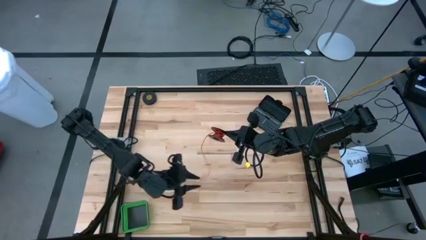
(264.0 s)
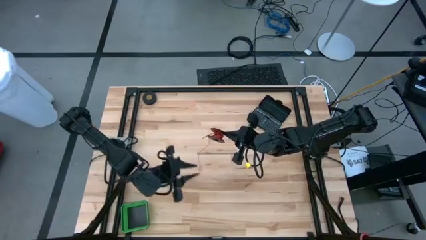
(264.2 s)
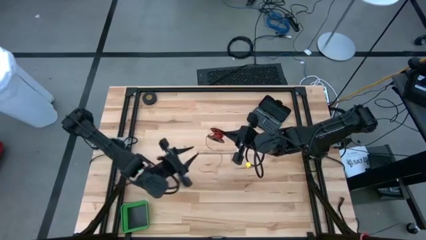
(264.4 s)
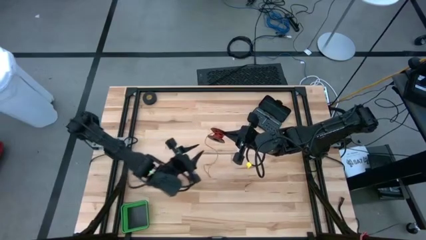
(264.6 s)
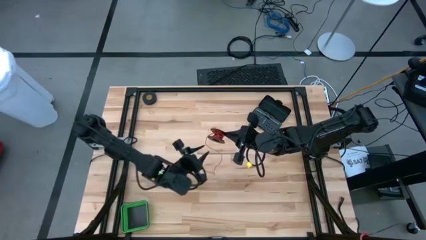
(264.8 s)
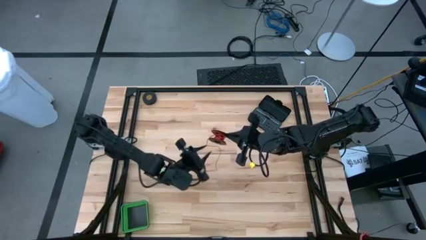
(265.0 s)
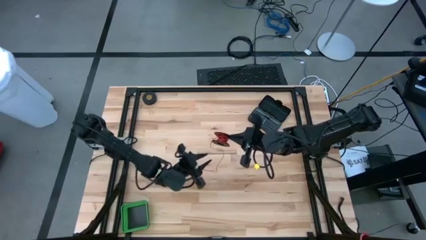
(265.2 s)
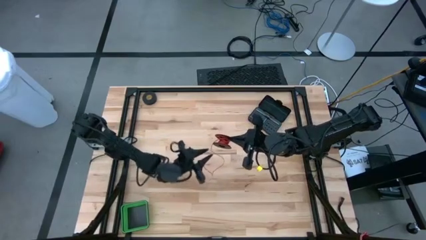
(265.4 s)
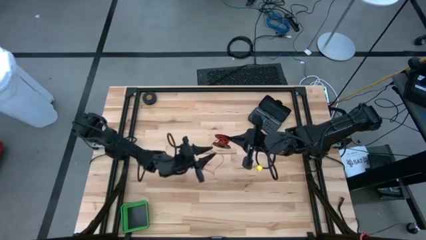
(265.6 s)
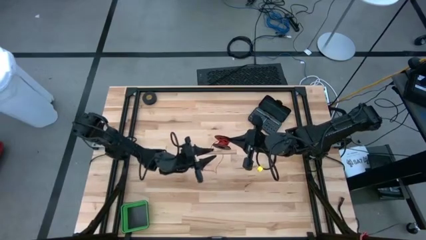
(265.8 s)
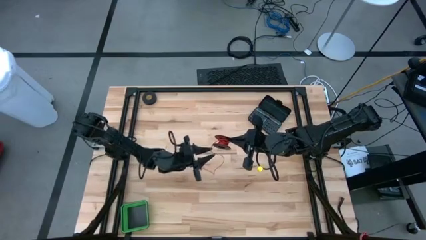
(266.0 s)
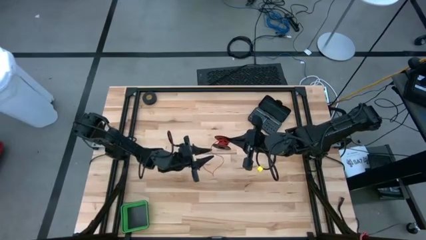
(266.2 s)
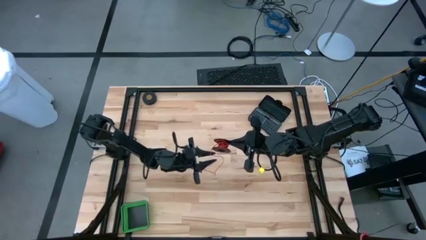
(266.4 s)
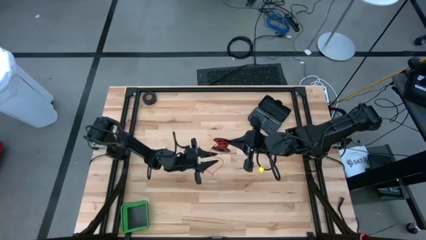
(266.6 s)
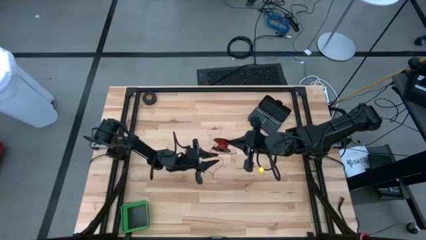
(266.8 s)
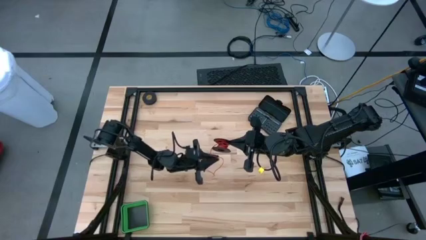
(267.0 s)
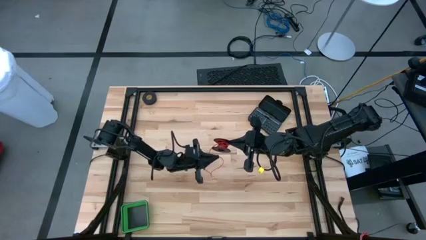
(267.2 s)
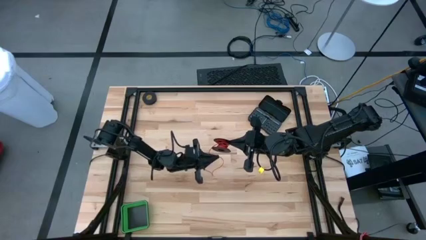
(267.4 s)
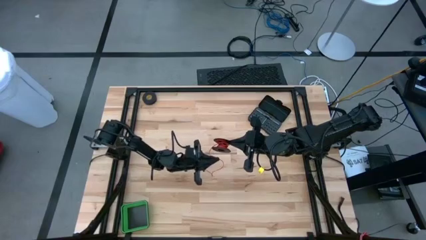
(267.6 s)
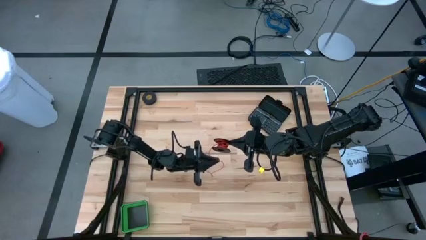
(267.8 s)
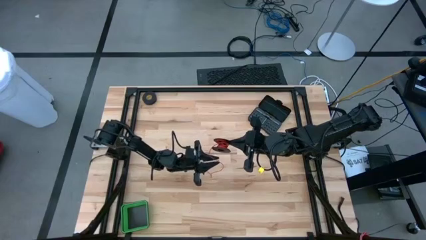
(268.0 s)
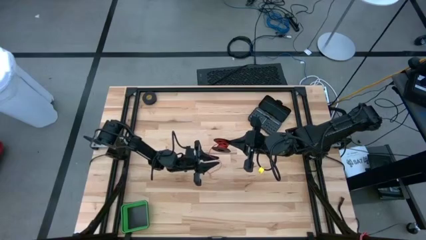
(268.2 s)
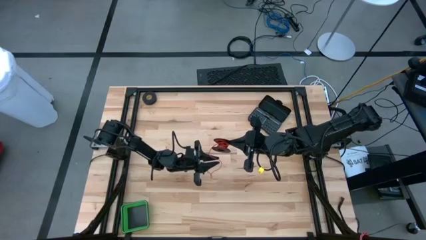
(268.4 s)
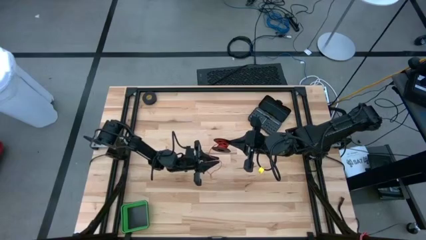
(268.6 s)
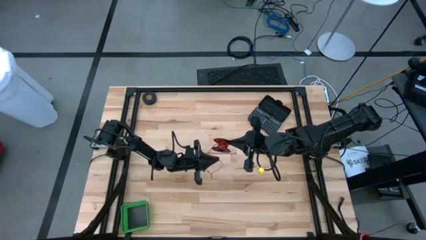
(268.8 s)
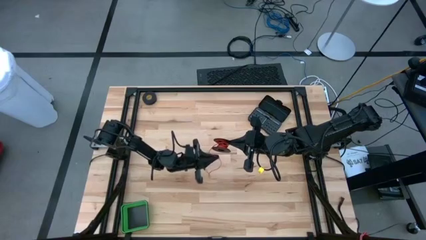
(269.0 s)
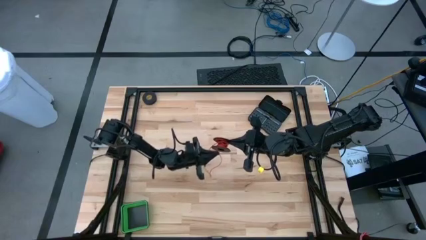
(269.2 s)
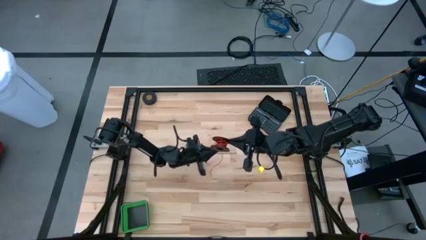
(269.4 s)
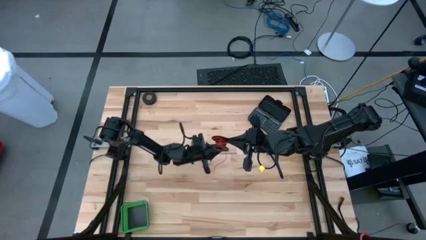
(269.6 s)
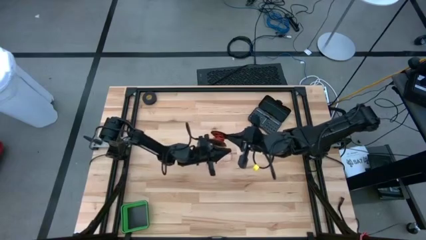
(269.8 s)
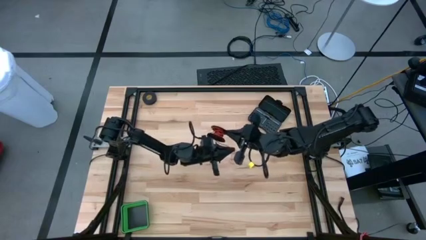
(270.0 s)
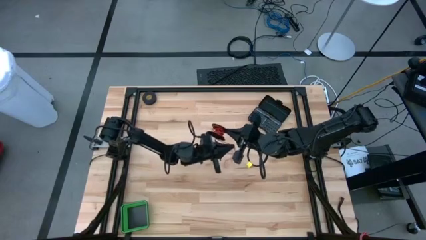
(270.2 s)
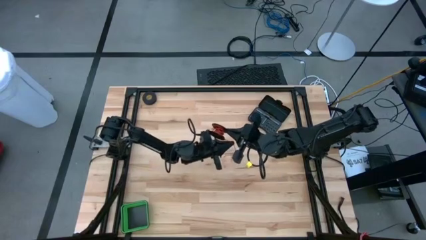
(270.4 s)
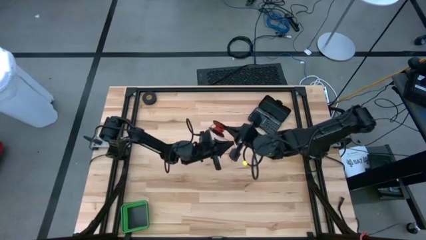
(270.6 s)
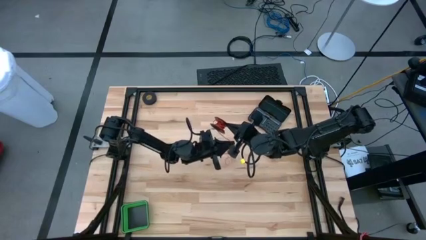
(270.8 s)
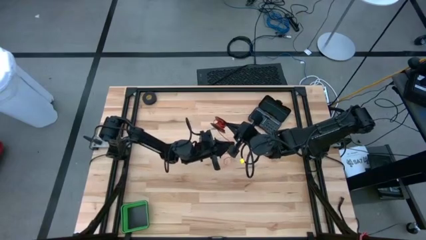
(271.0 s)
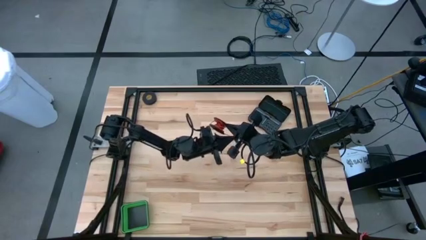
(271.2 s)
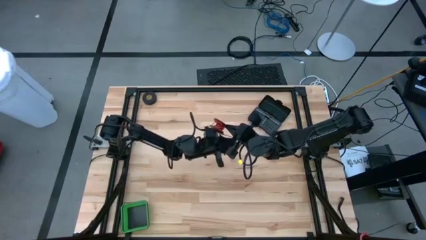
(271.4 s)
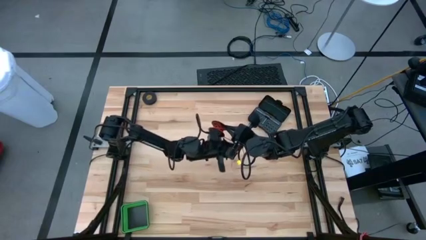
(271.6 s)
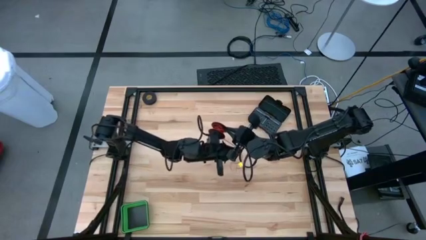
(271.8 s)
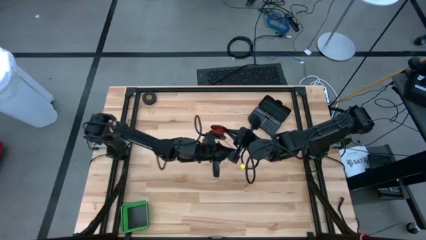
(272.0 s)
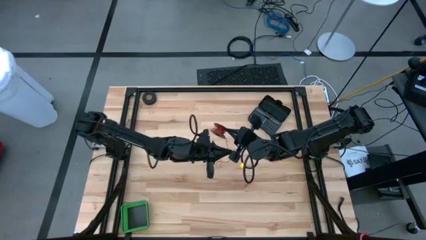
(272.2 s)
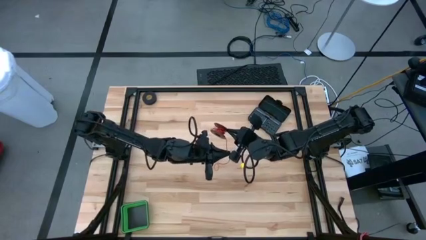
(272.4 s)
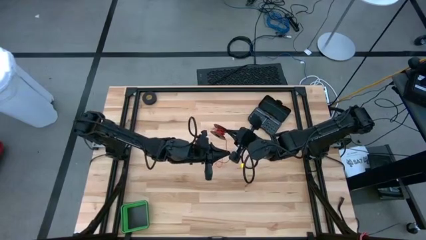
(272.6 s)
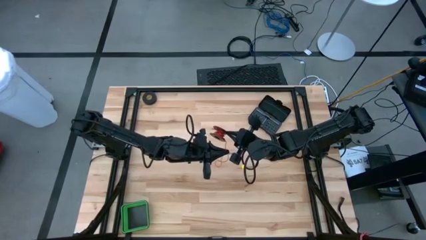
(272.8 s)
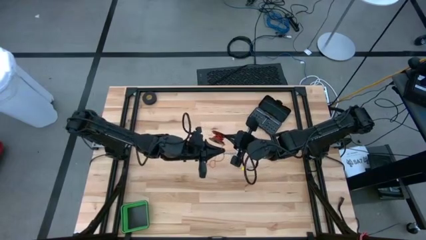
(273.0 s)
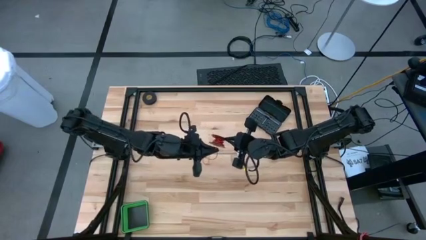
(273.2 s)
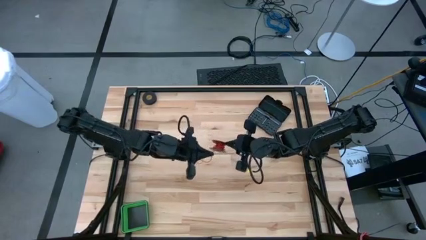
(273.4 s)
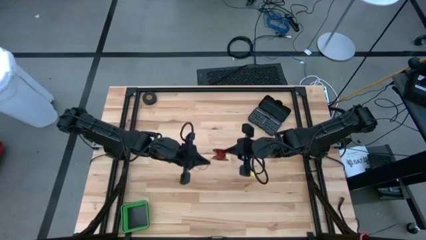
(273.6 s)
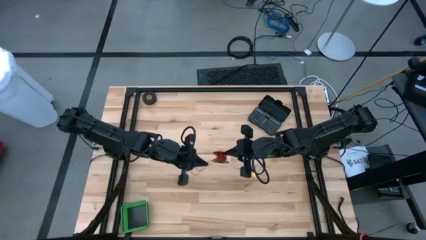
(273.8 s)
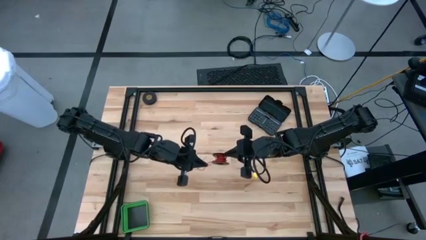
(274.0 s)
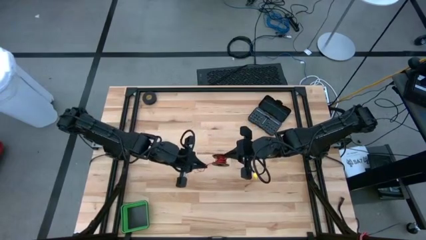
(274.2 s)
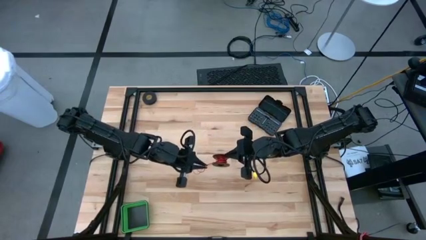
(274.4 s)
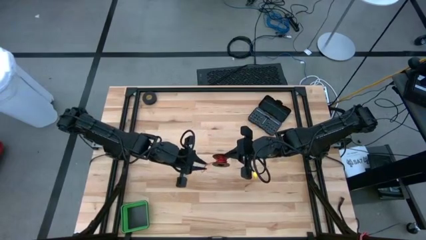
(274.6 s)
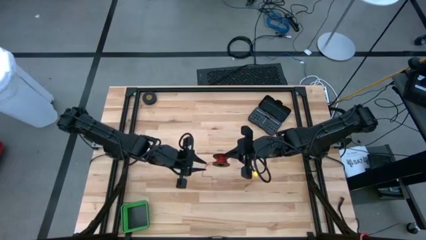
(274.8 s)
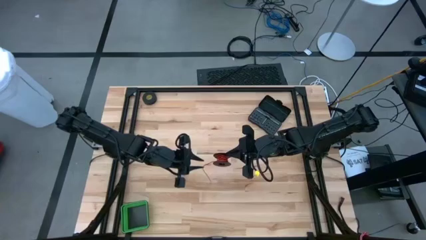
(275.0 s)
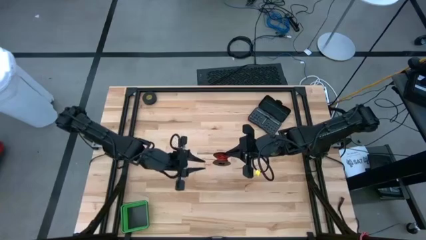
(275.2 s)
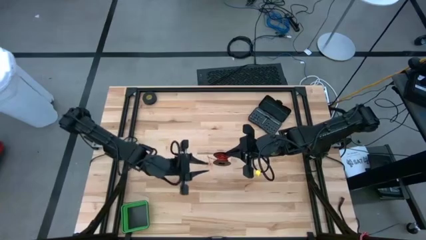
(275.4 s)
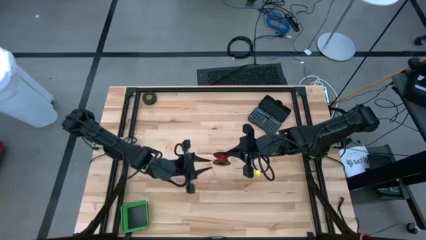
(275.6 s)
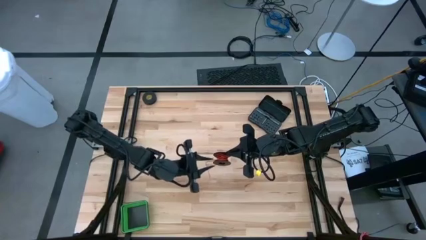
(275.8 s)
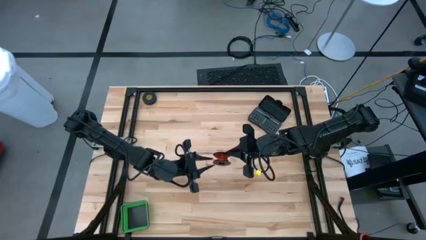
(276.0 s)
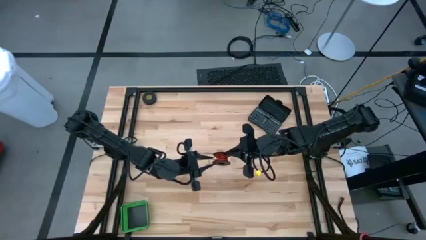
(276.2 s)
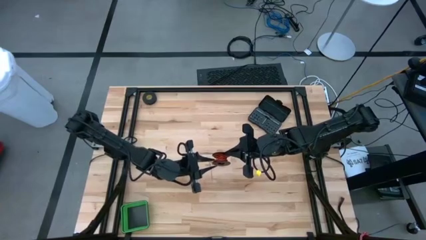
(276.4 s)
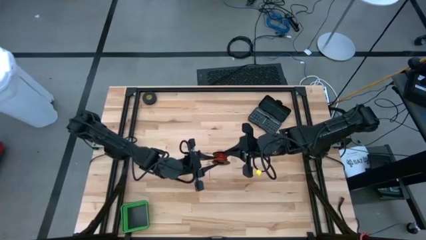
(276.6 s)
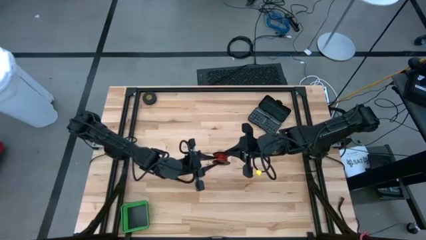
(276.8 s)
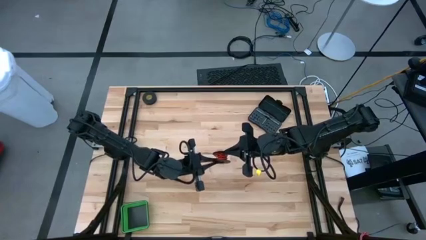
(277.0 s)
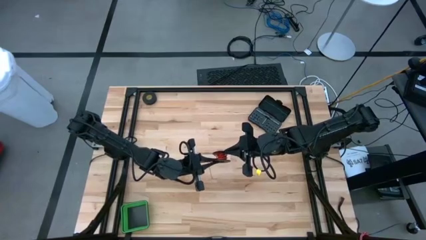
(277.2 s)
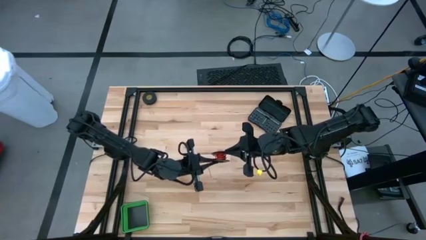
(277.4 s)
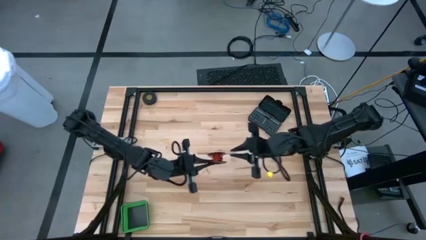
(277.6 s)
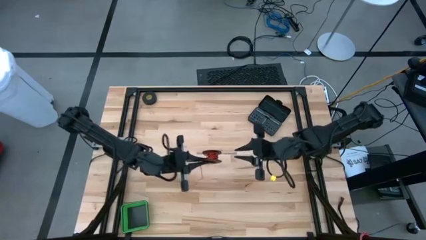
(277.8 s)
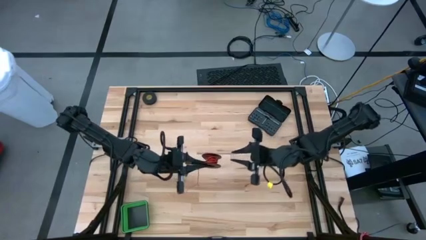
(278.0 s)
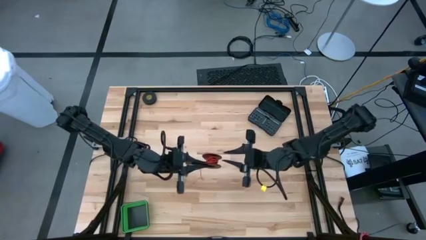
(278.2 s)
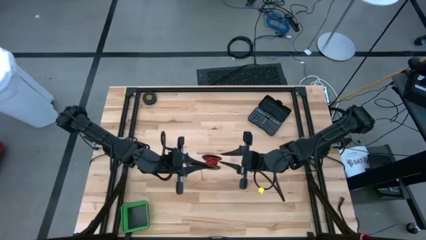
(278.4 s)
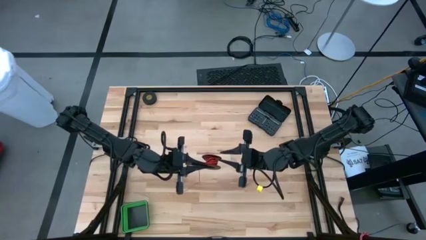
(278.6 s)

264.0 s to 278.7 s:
Task: Coil cords
Coil the red wire into the spool

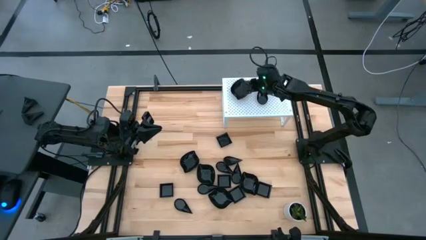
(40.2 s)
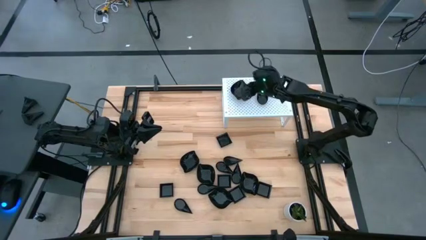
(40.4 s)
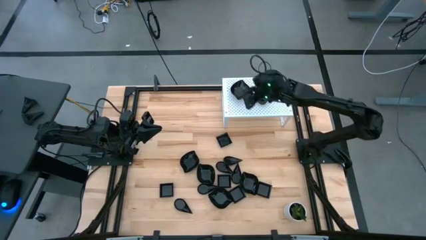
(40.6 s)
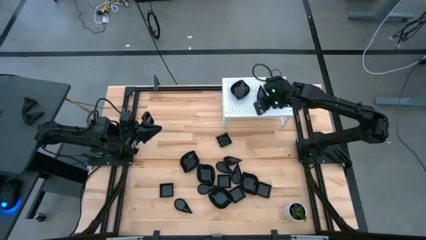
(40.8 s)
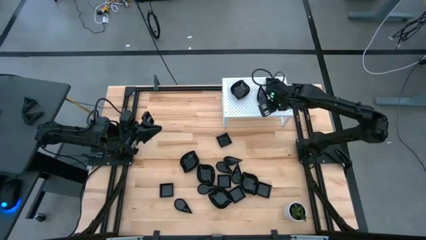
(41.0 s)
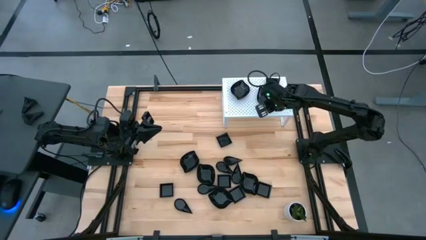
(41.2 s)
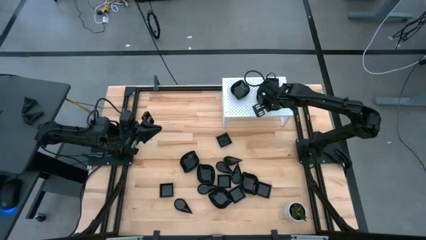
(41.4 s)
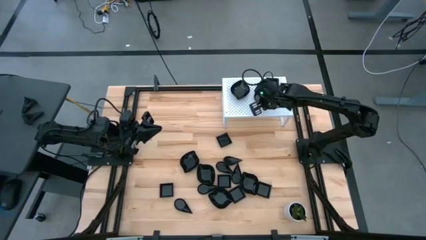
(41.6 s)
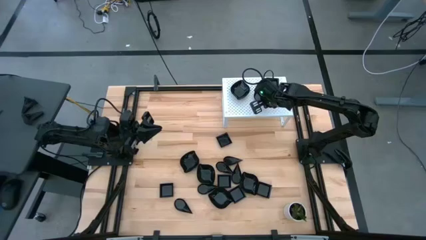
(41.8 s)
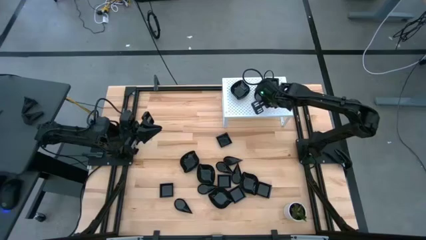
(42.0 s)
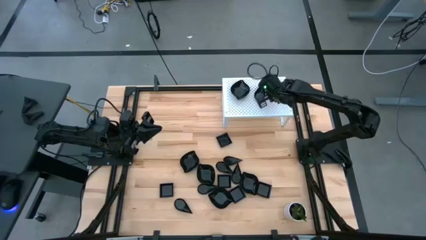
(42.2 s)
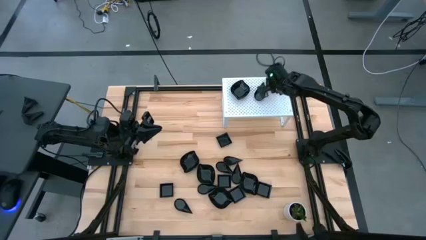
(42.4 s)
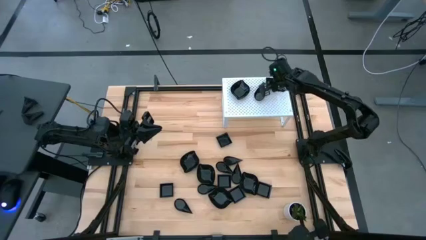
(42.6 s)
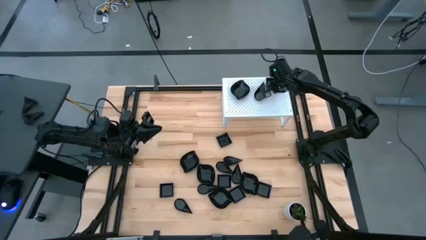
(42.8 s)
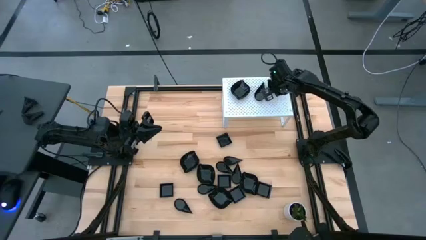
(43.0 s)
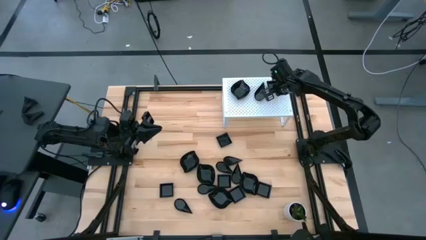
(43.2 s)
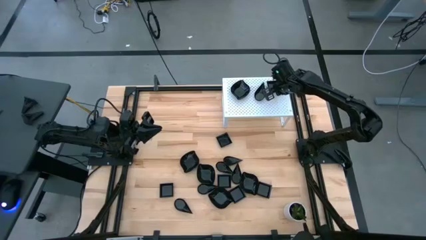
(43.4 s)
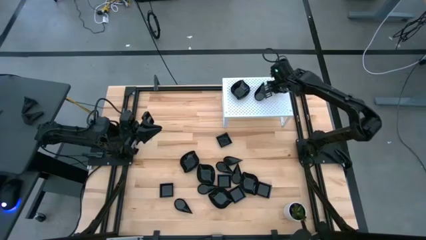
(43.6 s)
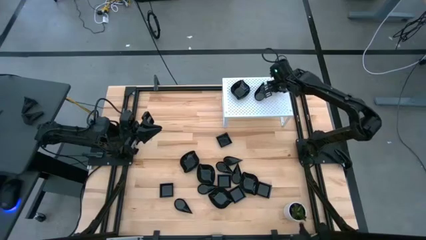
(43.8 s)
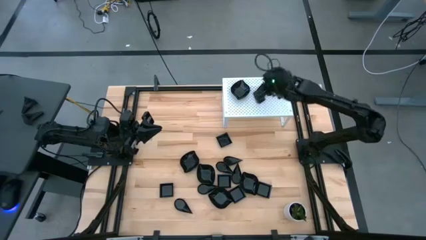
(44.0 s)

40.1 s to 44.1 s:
Task: Pick & Place Mini shaped plates
Adjust the plates on the shelf
